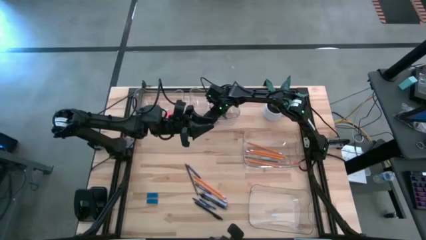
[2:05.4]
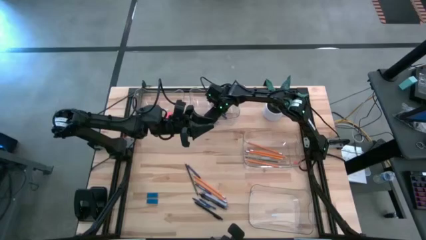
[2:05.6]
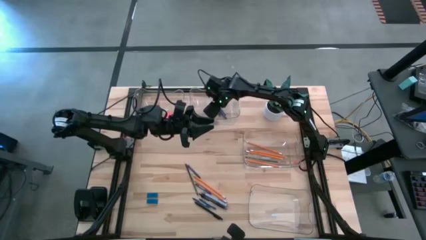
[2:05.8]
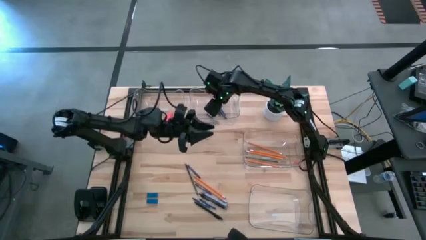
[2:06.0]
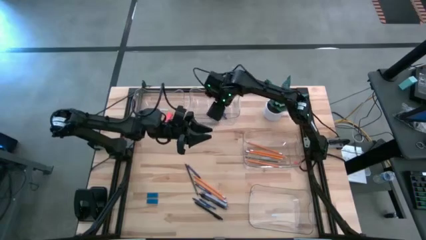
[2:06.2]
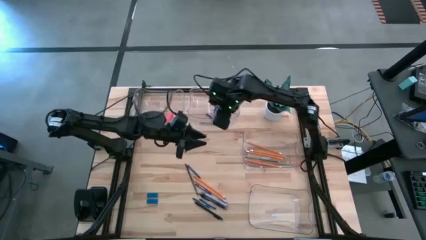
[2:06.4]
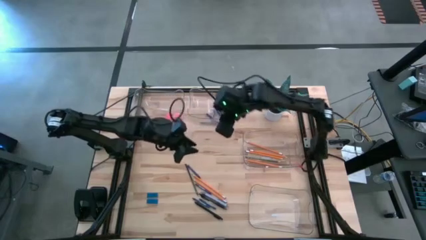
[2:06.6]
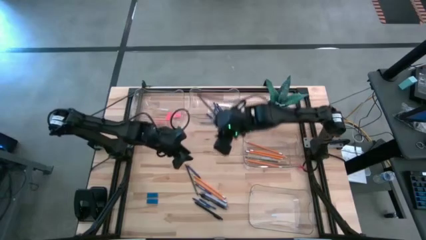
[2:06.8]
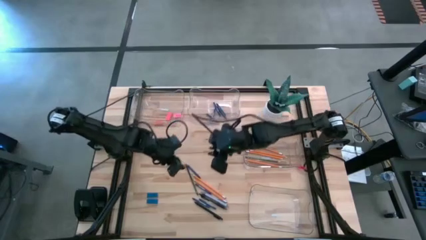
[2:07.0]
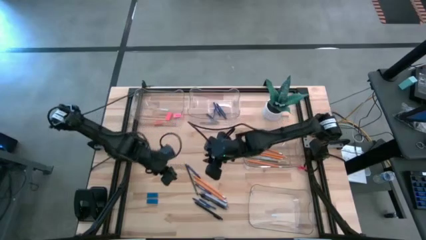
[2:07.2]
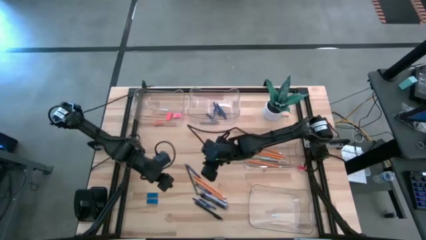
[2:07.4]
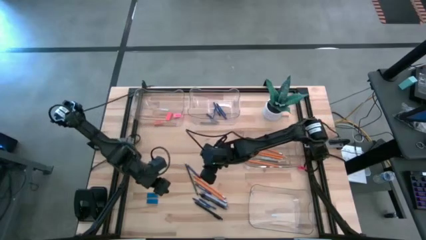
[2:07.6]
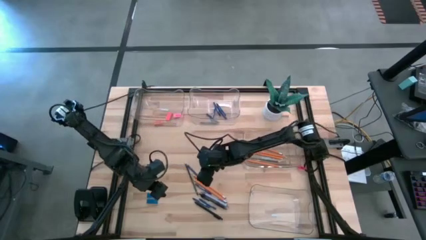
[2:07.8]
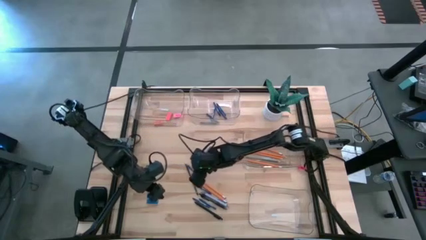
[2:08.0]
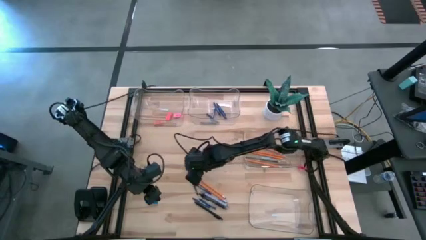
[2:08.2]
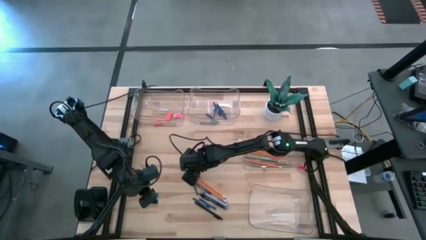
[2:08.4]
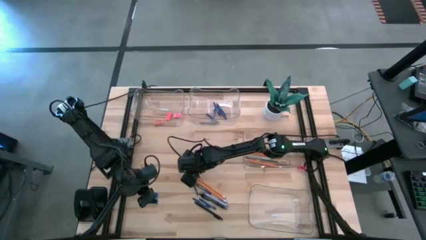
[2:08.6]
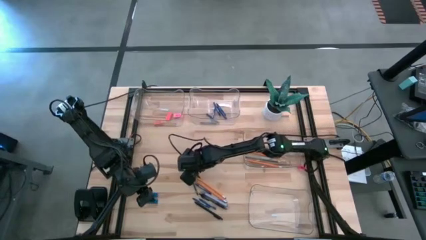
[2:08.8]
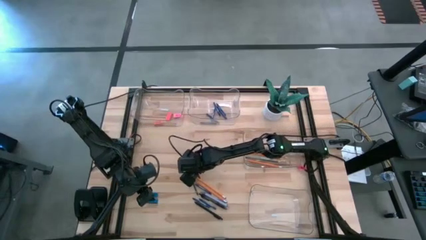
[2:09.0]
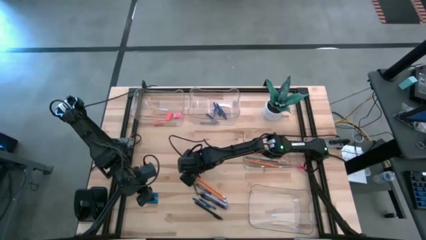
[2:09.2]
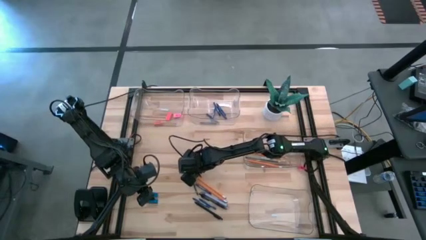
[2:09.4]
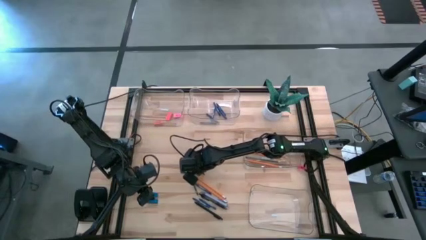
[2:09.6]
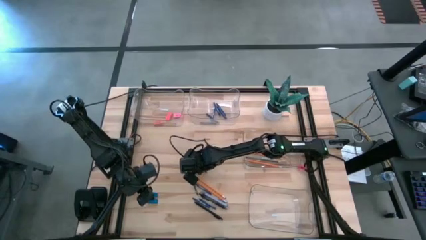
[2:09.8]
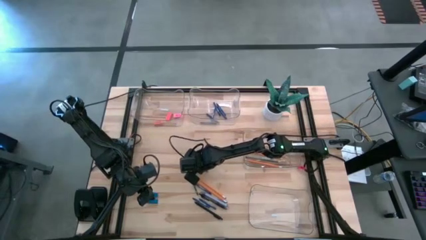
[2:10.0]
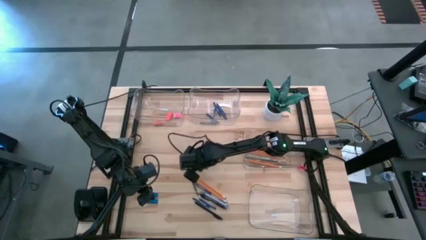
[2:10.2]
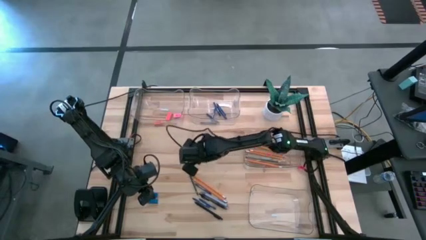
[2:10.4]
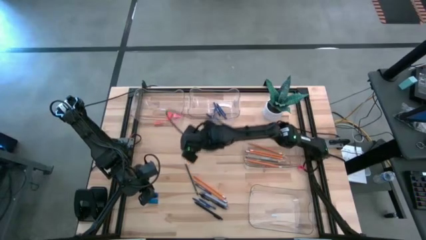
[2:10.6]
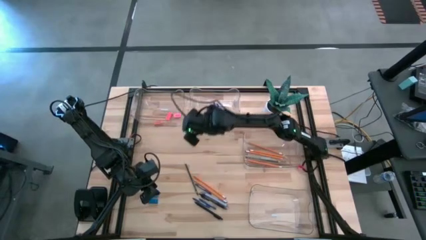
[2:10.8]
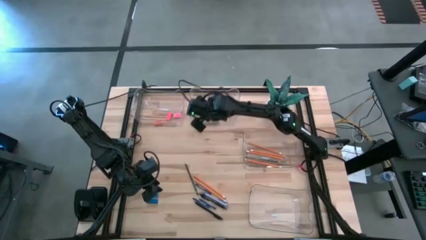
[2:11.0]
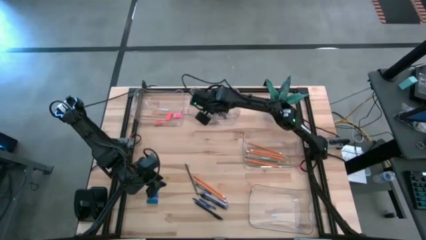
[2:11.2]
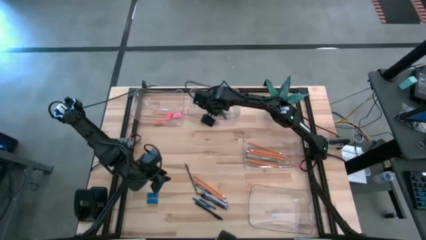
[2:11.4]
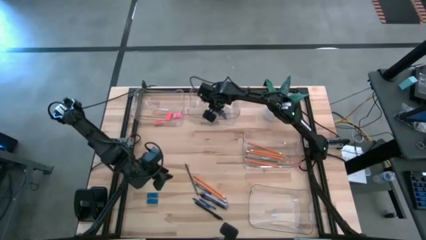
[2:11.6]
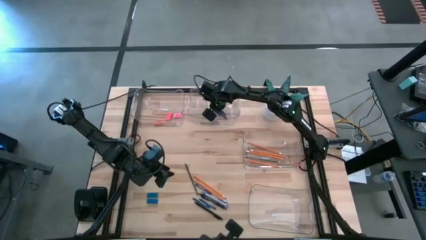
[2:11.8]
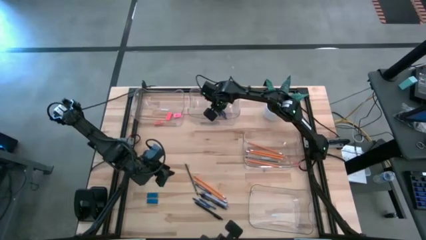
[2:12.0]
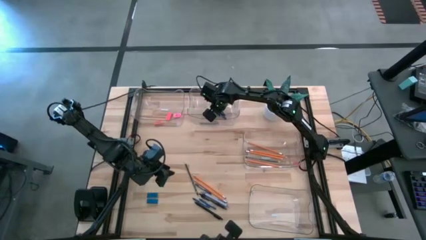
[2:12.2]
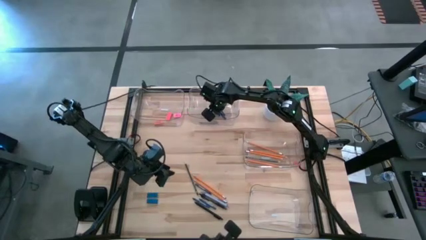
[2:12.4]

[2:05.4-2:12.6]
Task: Sort crayons/erasers/pens/pencils in bins
Put the blue crayon into the top right transparent bin

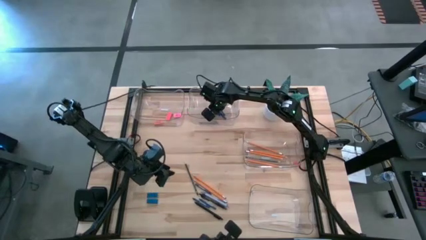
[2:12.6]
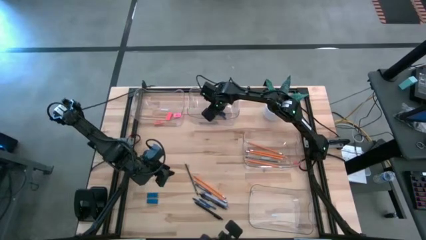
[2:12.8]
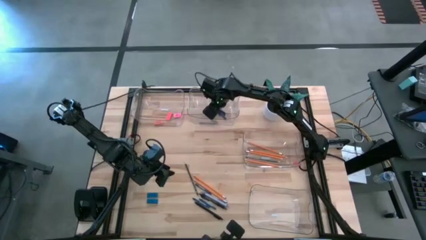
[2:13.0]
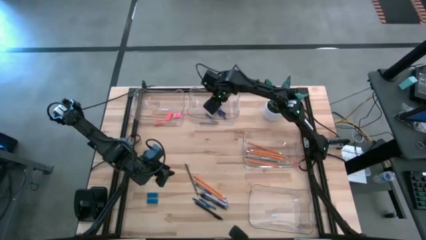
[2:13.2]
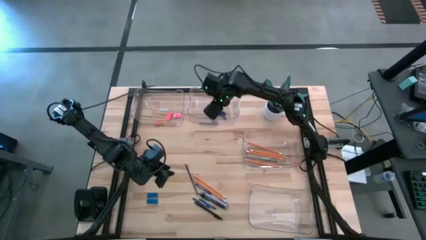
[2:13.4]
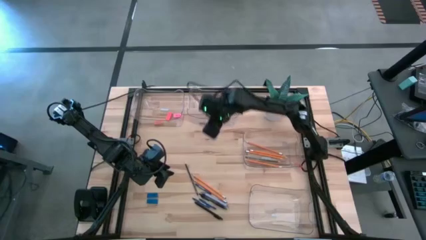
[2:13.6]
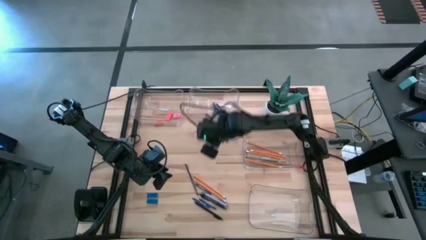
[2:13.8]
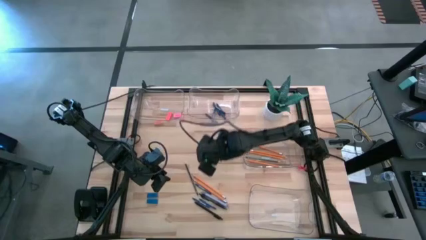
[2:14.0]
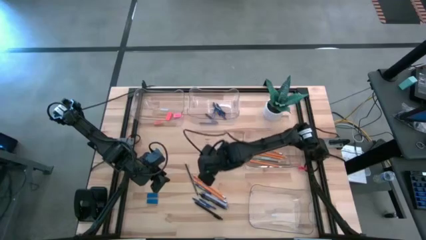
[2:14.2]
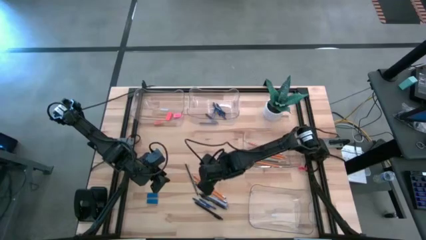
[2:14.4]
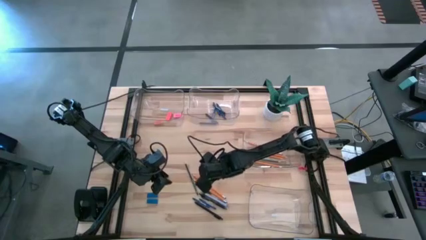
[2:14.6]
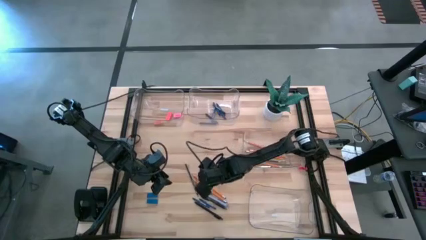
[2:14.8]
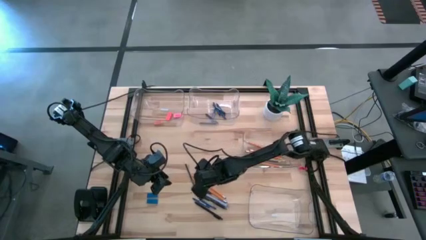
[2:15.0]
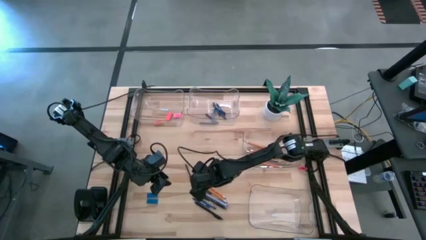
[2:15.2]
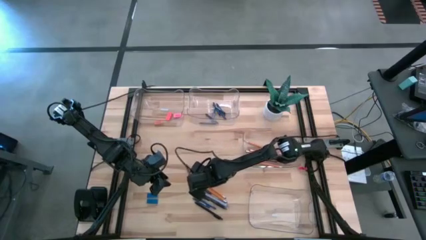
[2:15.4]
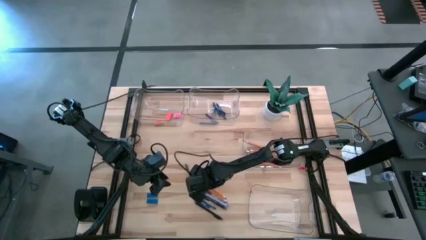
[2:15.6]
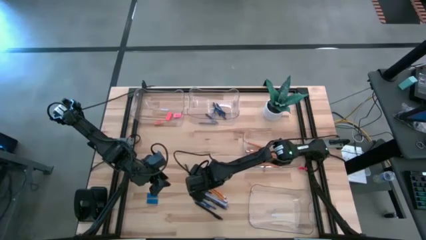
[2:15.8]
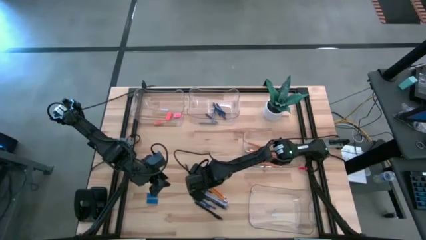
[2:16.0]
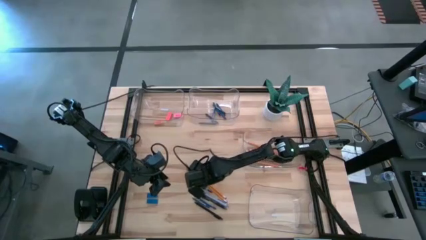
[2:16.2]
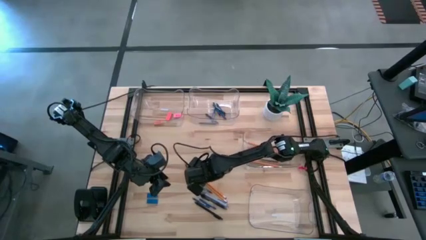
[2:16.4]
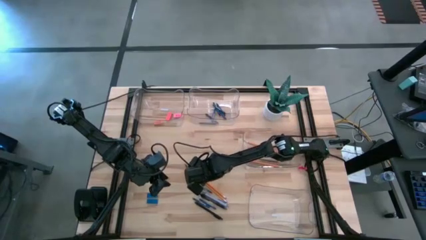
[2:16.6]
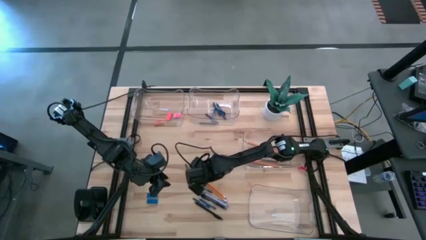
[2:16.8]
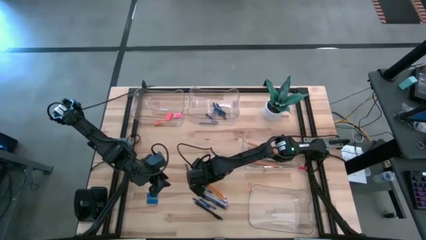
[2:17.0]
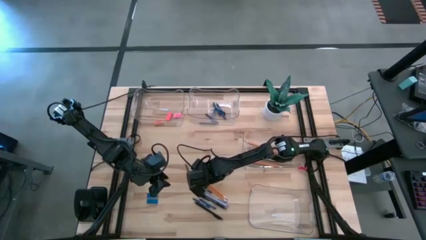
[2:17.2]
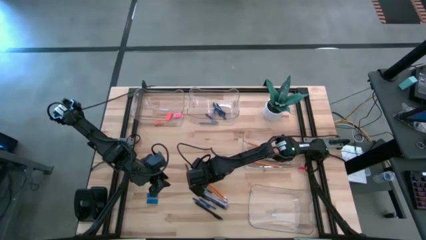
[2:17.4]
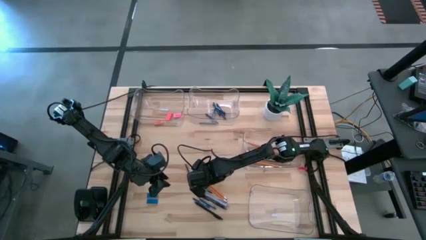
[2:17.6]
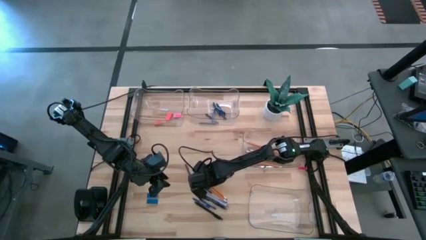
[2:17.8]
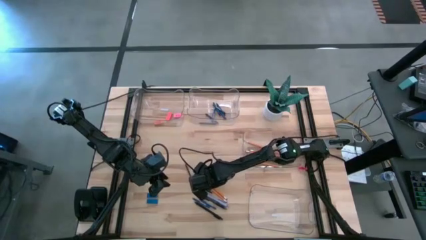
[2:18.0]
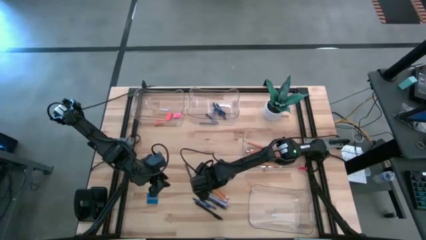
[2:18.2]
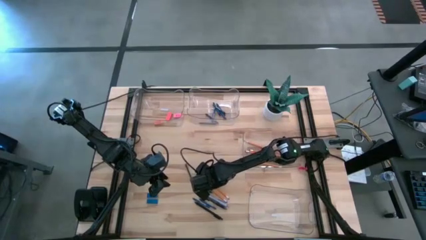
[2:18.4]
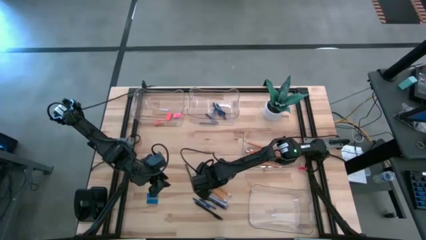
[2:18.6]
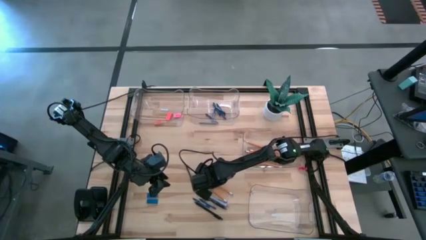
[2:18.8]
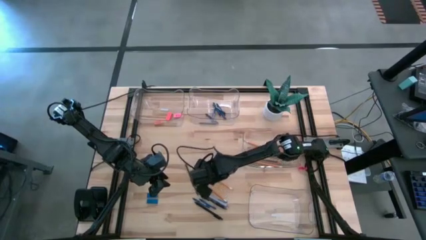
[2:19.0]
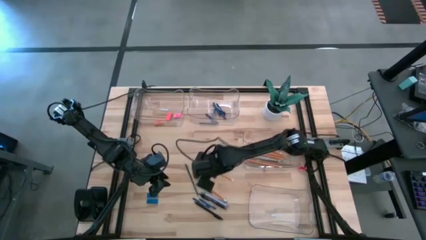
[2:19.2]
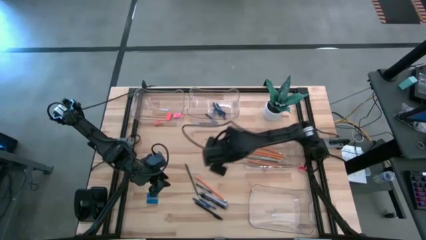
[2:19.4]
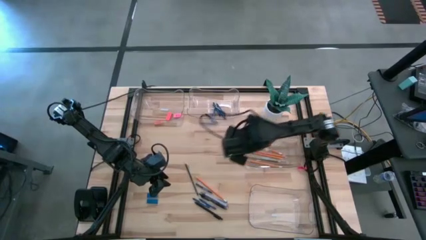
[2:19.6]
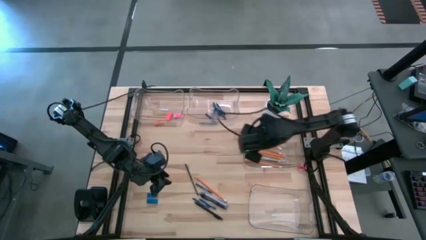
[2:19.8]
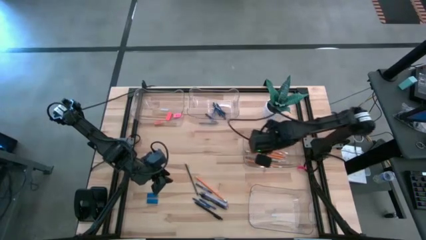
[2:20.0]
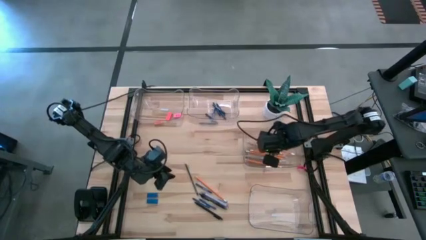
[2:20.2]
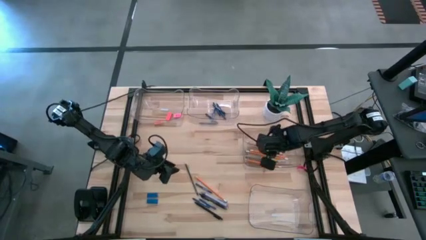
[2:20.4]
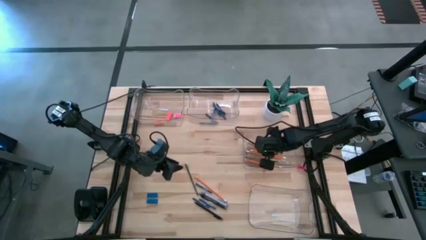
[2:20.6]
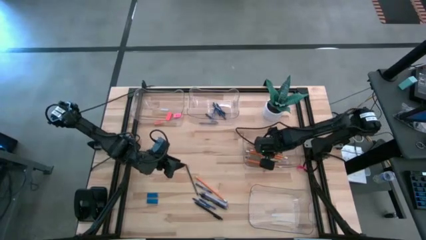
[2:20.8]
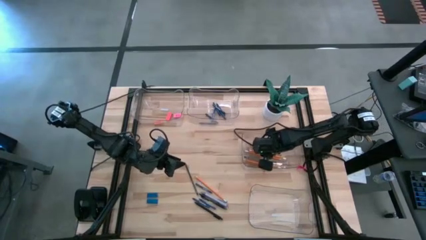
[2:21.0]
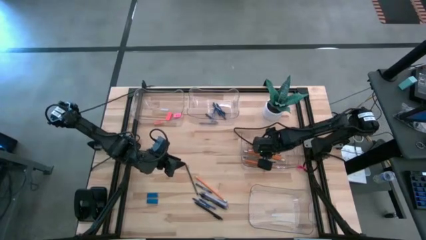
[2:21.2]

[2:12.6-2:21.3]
Put the orange pencil into the middle transparent bin
